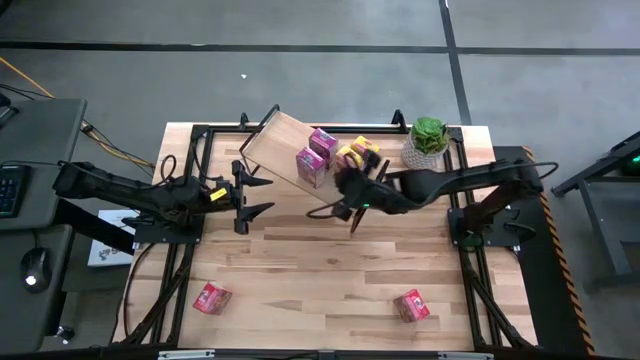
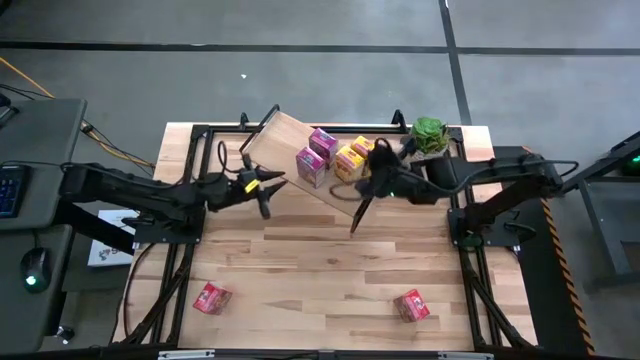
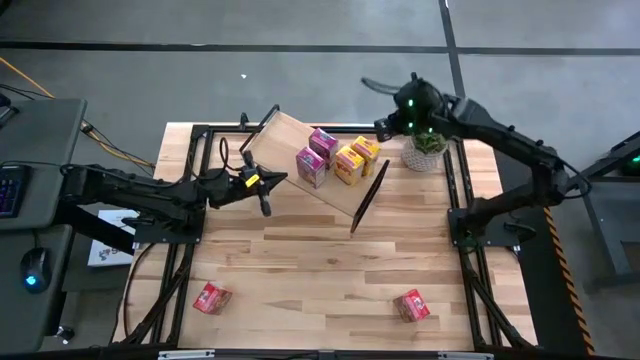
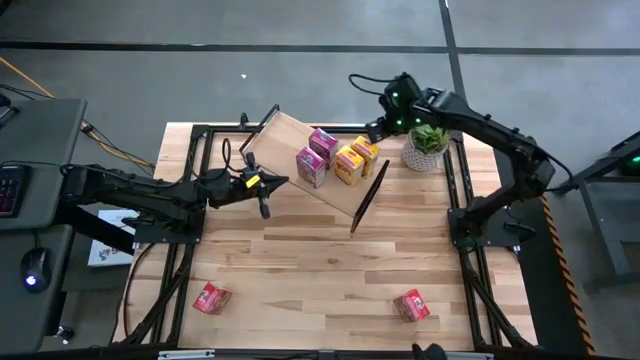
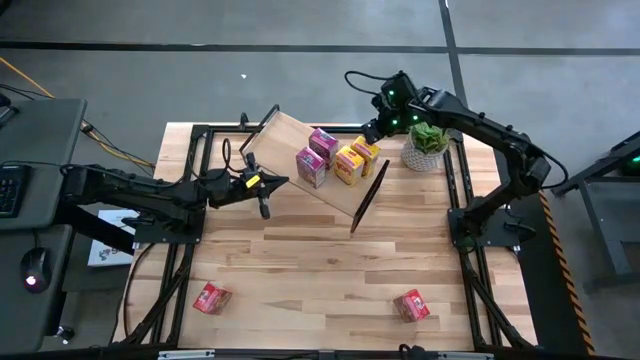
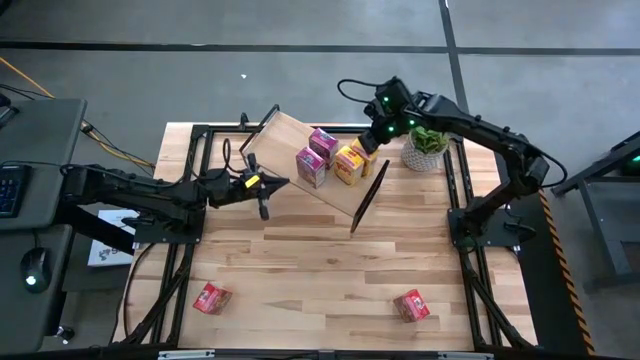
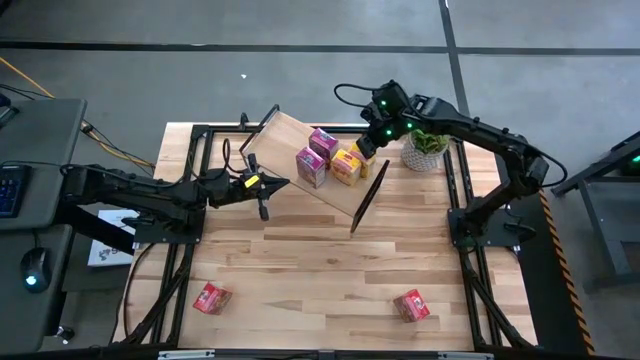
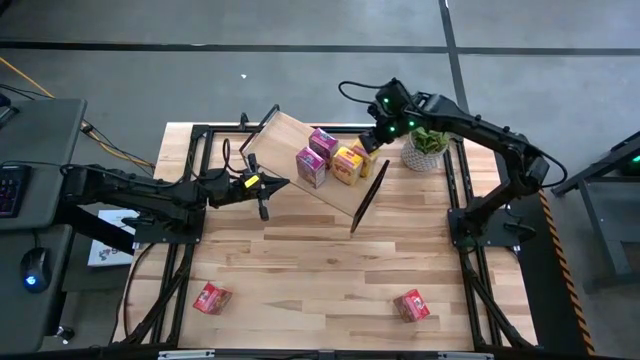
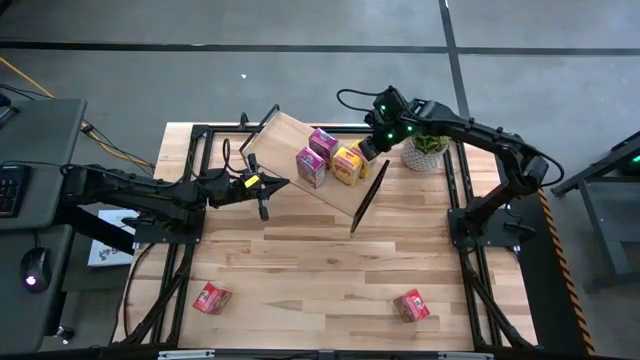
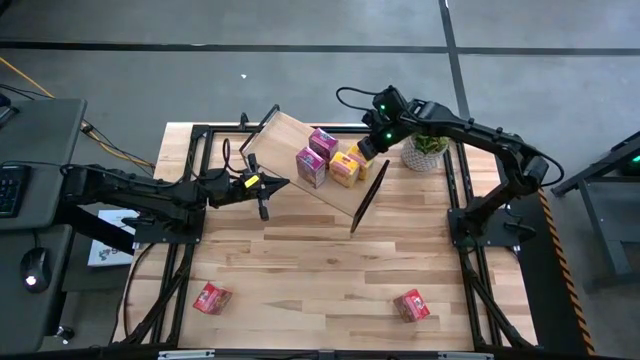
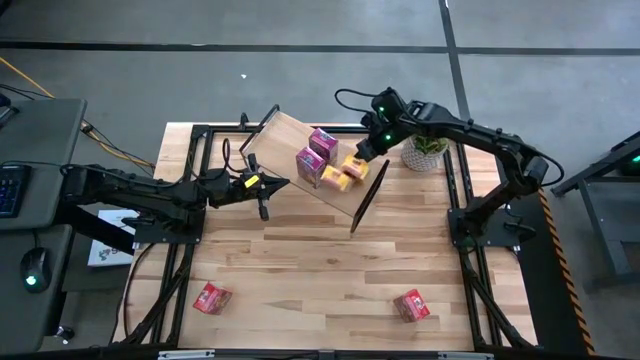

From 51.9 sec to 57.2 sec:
Task: Stack cereal on shelf
Adjust the yellow cereal box on the shelf

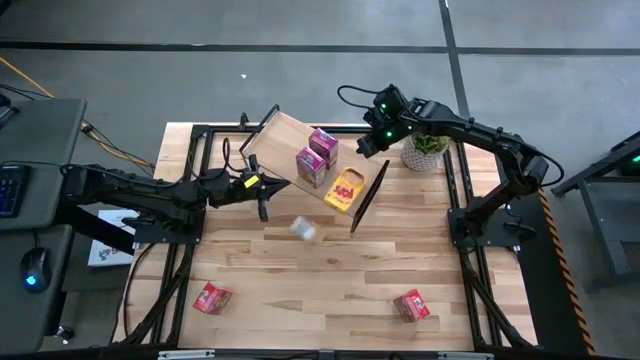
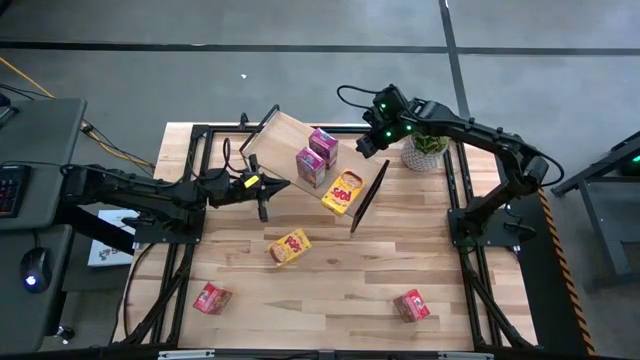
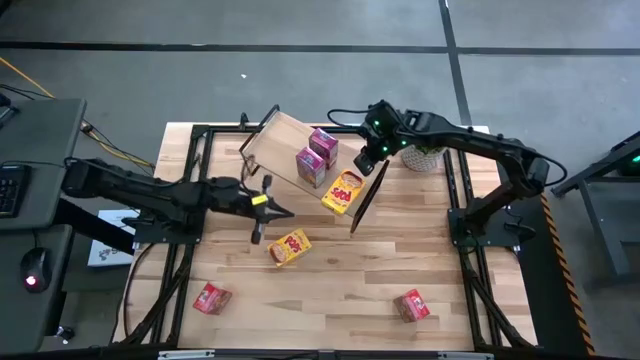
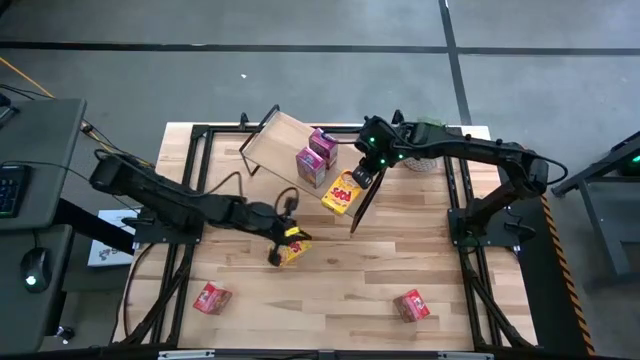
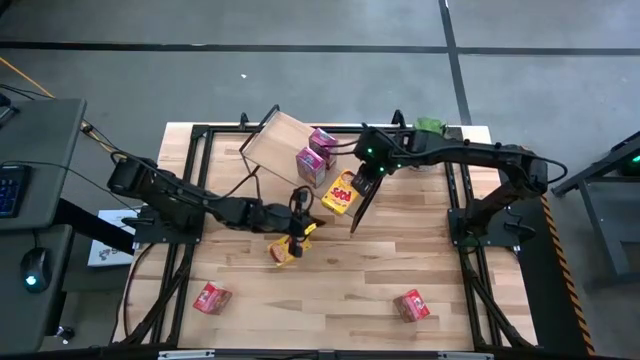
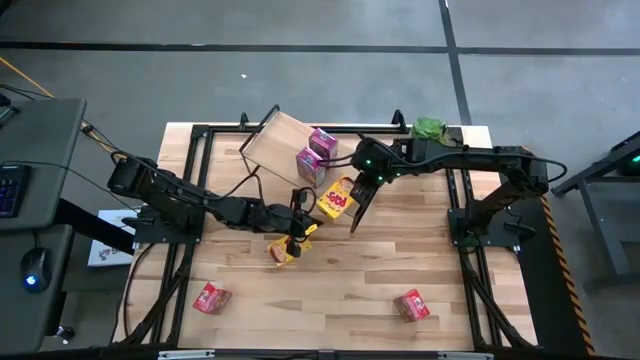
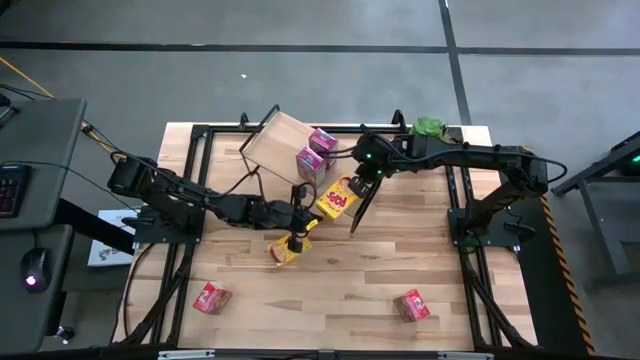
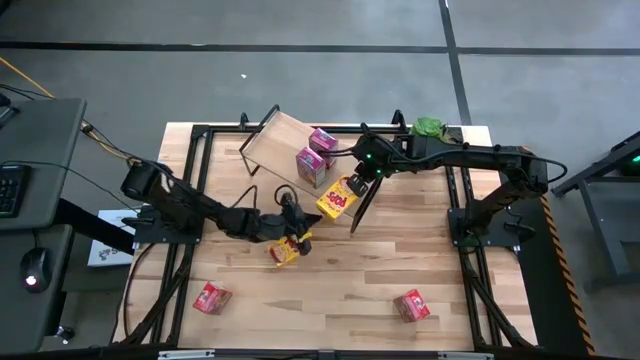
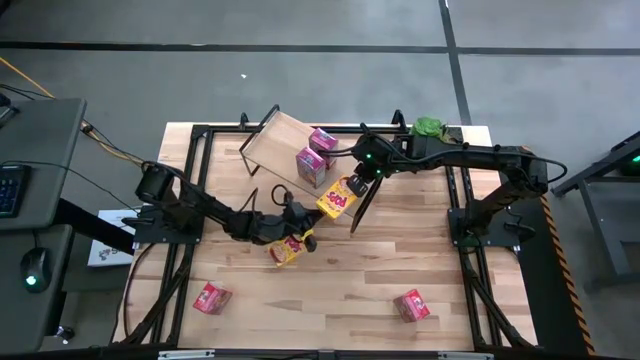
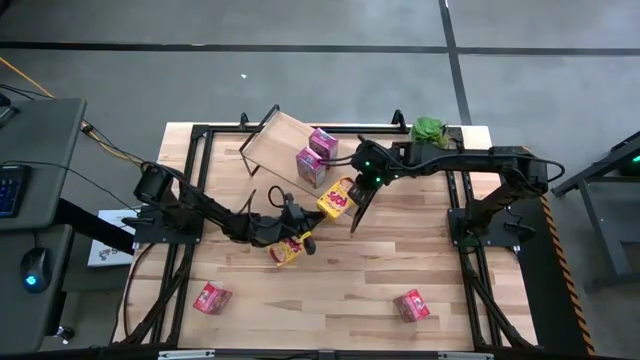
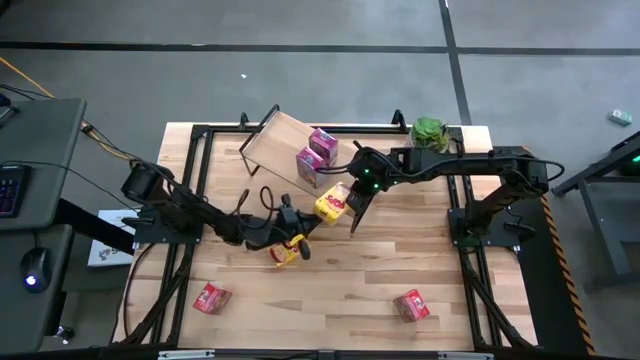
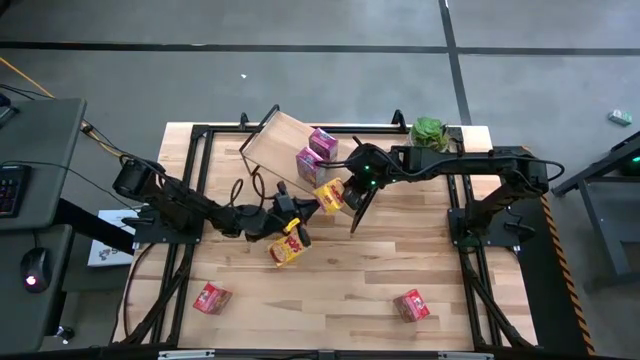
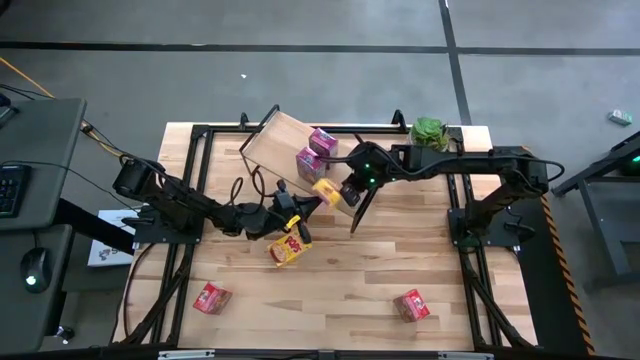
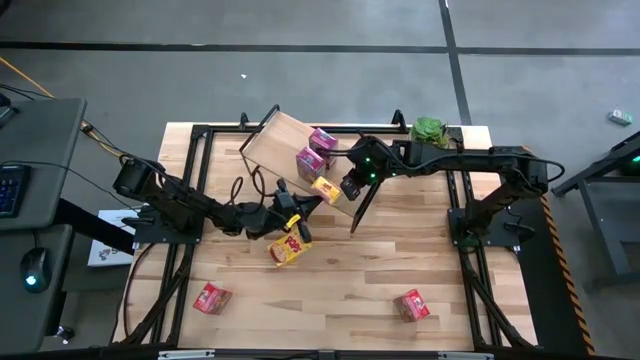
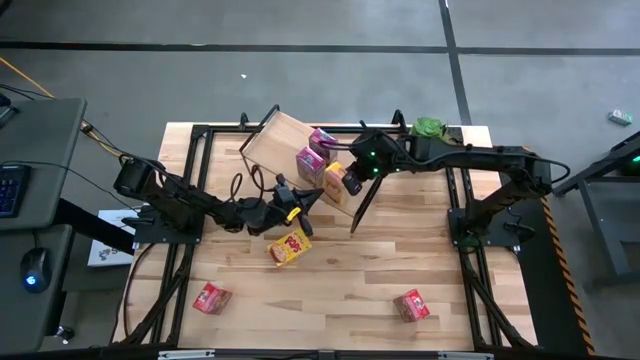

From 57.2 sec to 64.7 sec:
Adjust the yellow cereal box on the shelf

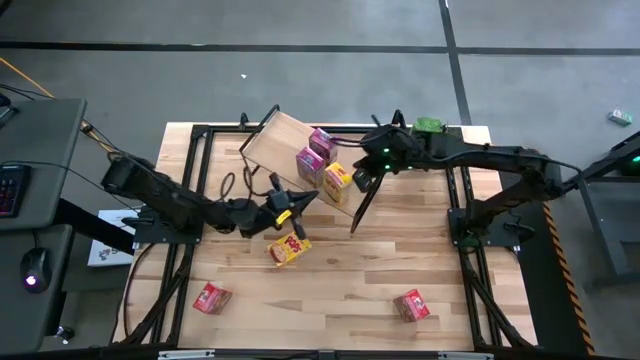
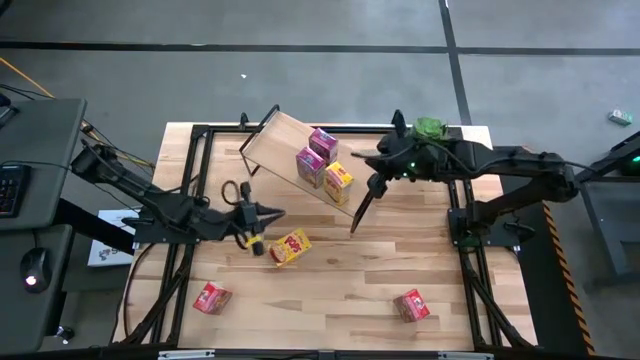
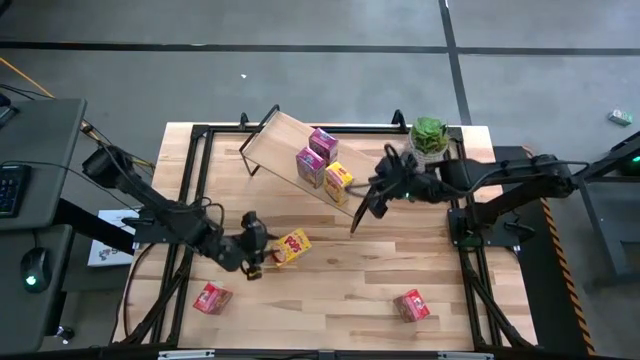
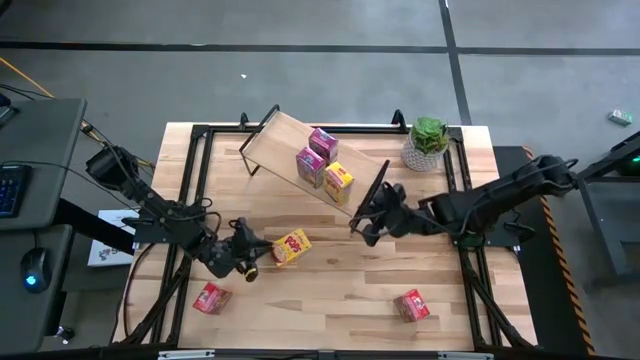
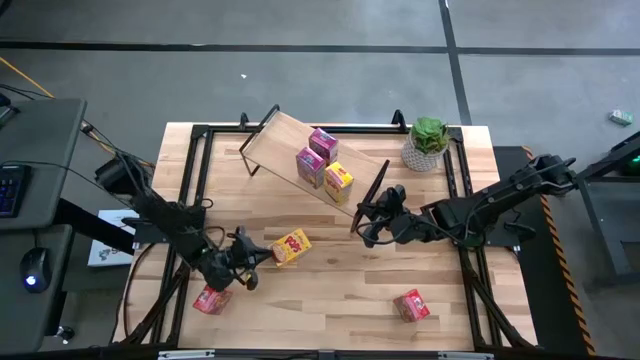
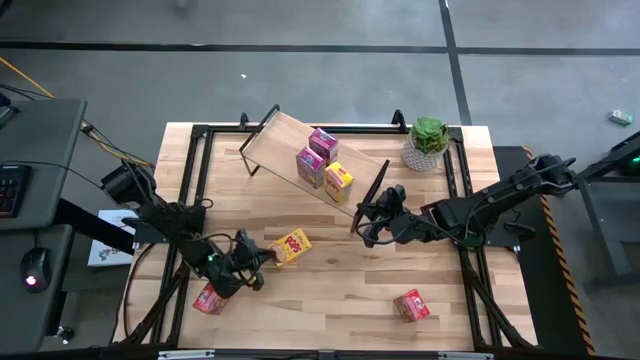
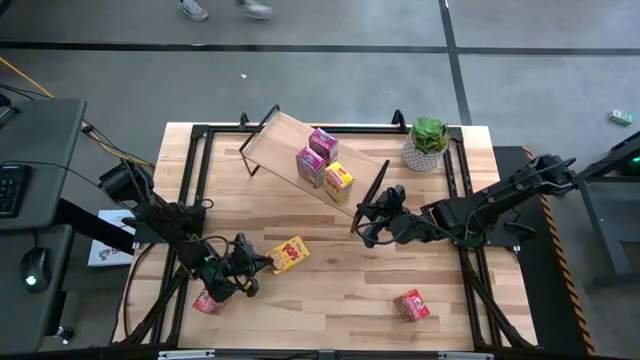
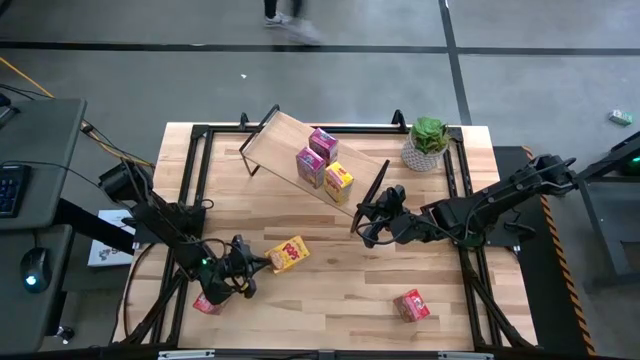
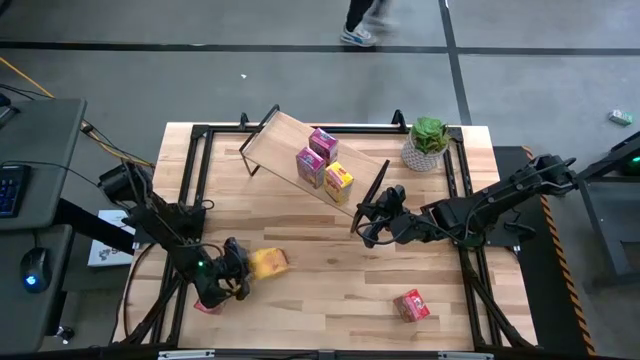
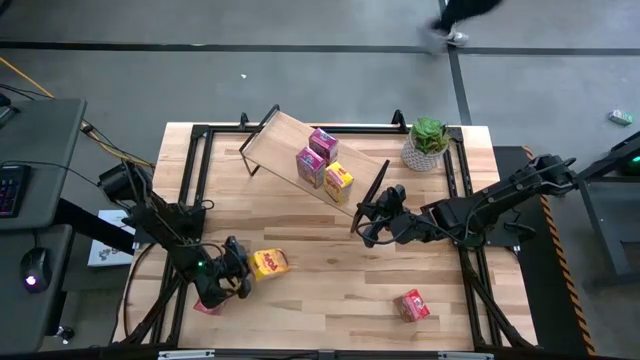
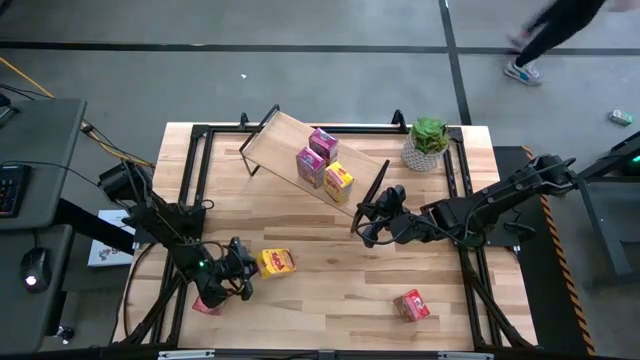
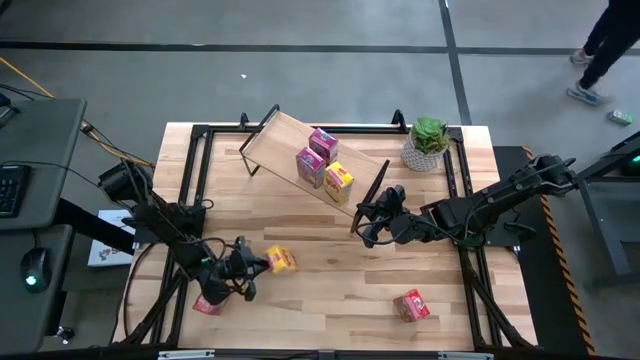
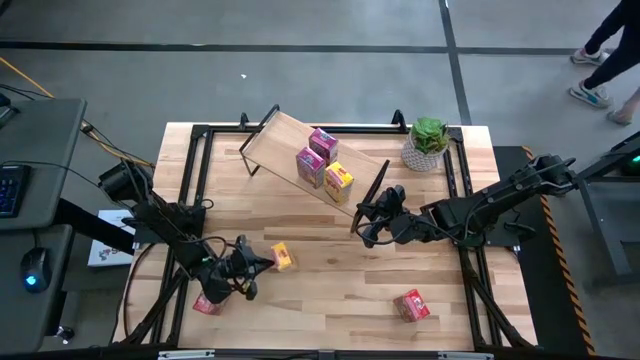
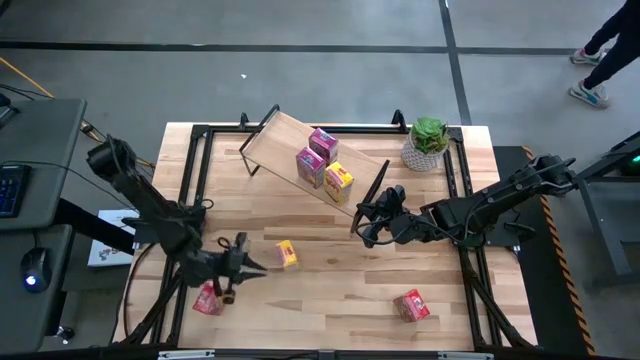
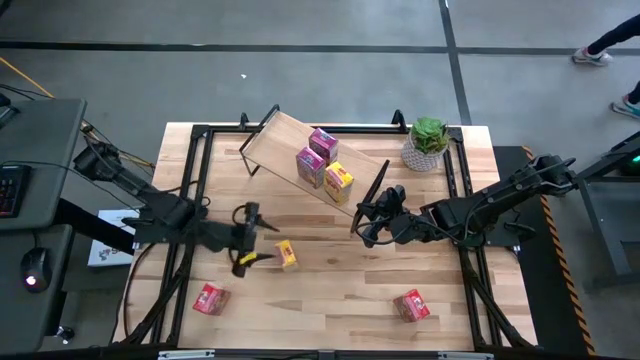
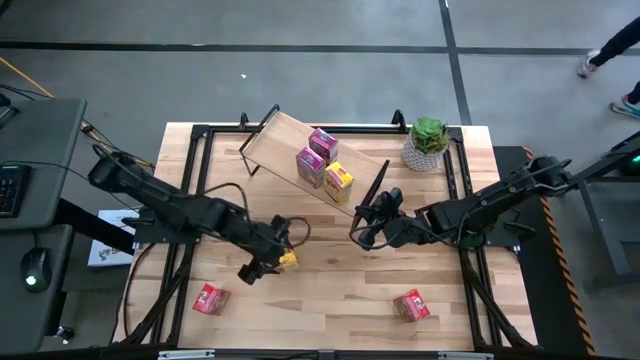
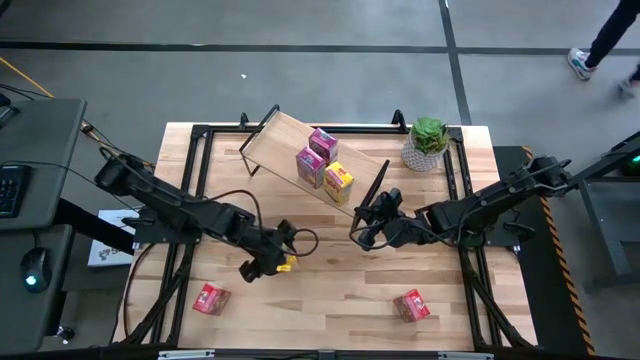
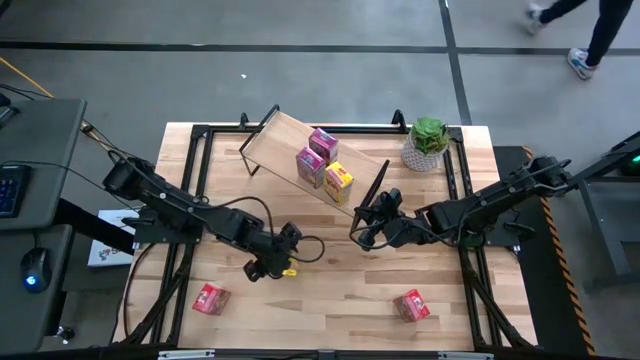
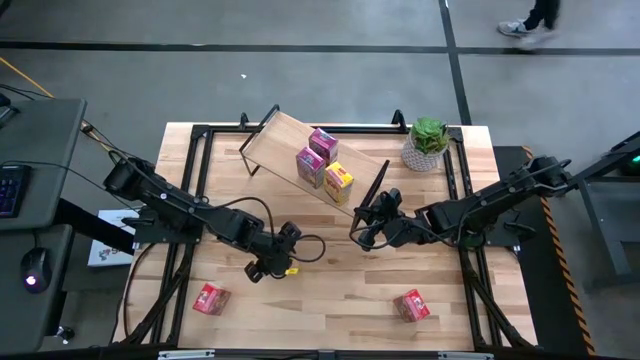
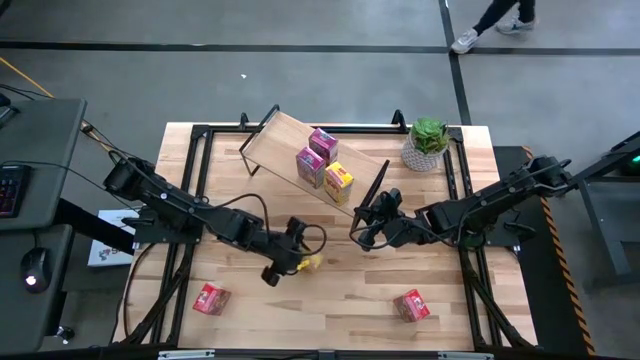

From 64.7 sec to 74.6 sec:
Put the yellow cereal box aligned with the other yellow cereal box on the shelf
